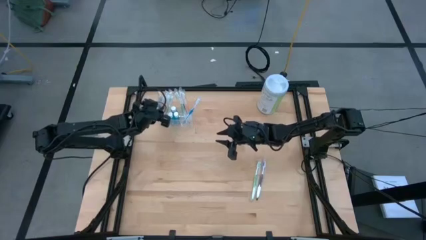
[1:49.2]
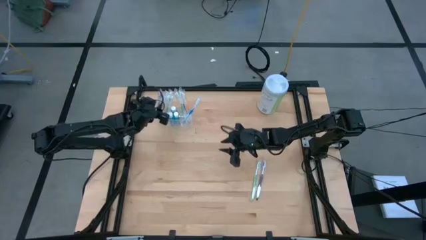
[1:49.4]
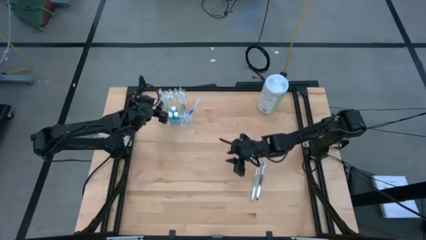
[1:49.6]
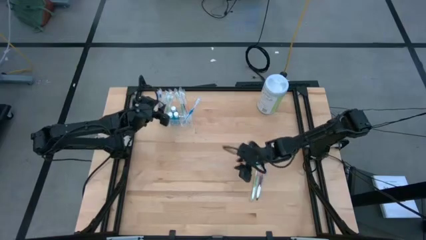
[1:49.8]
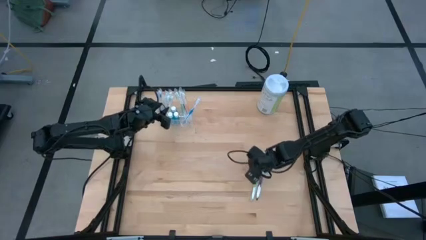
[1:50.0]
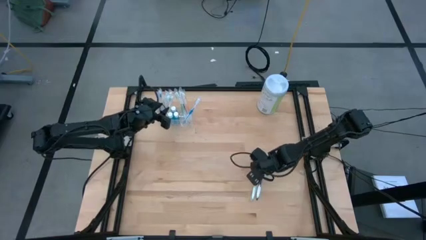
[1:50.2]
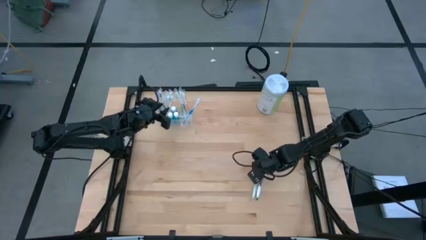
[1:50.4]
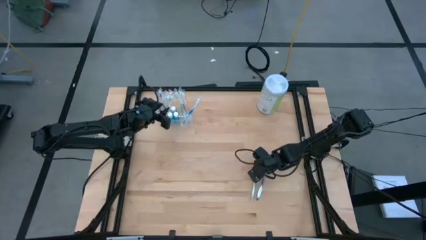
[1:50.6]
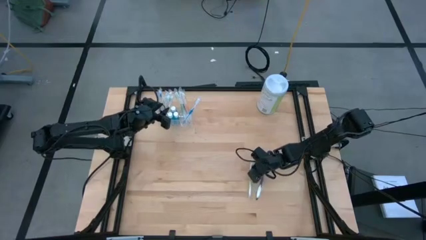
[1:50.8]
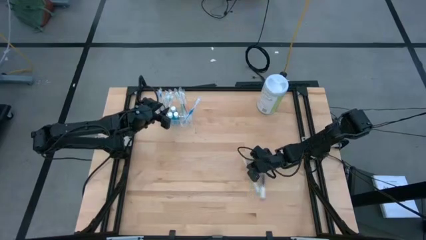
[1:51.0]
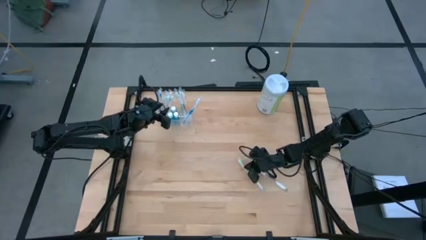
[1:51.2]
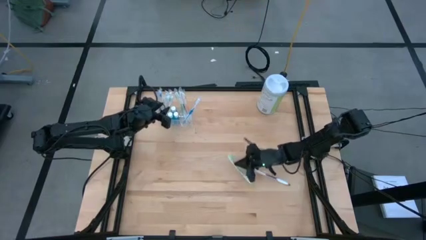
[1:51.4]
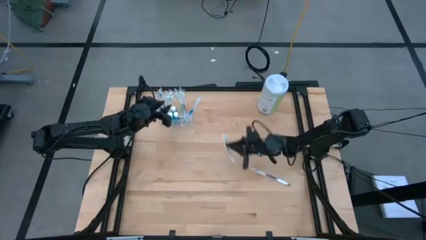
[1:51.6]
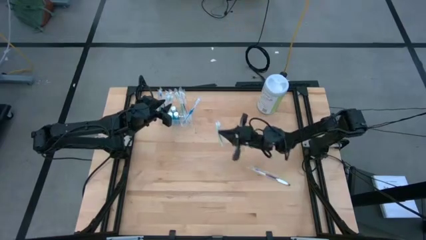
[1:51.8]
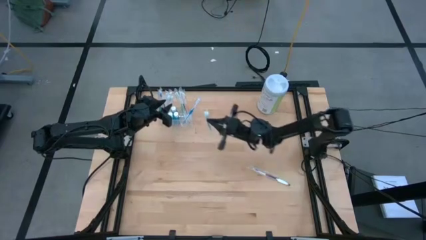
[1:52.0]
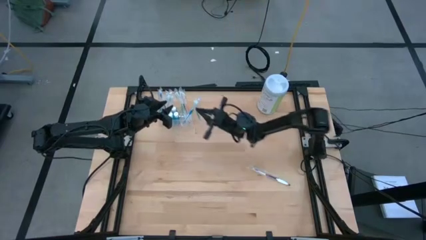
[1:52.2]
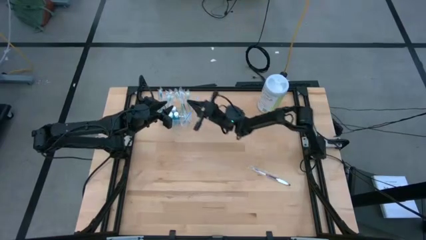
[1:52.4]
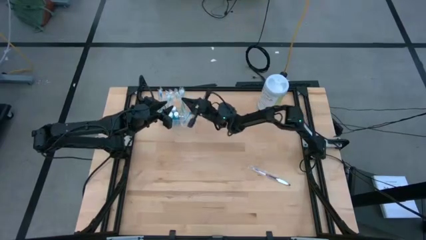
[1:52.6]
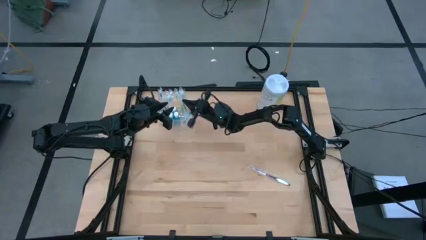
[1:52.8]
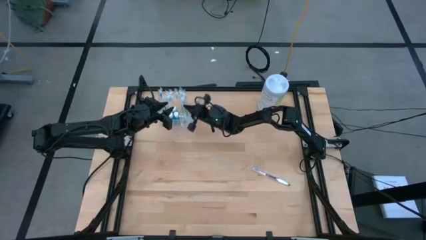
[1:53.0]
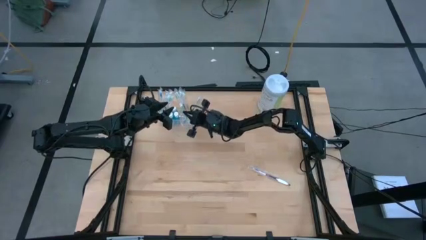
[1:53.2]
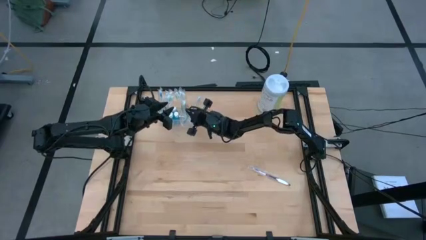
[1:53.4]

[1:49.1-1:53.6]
Task: Pick & Place toothbrushing station
Put the green toothbrush into the transparent organizer

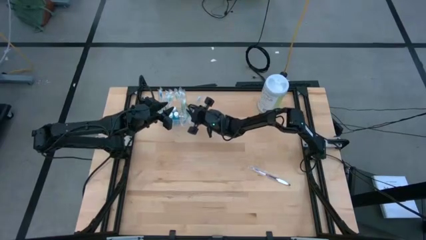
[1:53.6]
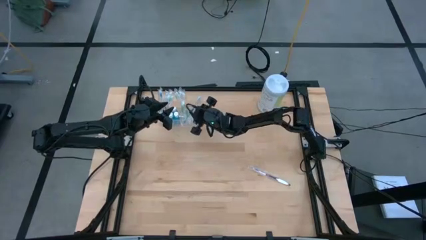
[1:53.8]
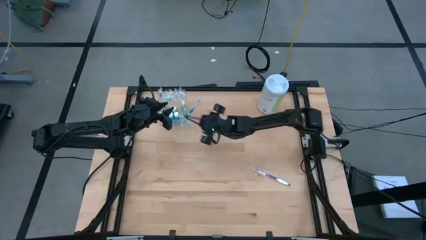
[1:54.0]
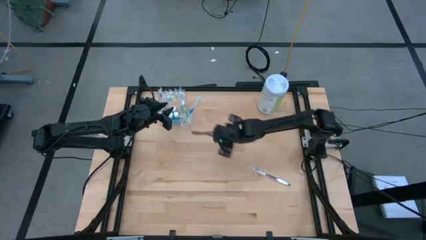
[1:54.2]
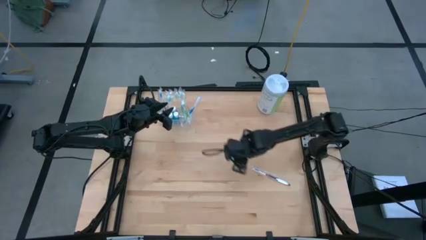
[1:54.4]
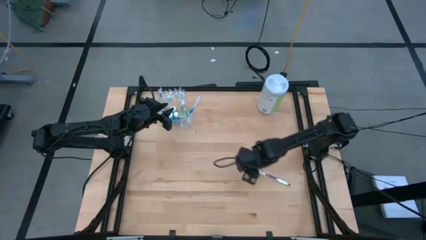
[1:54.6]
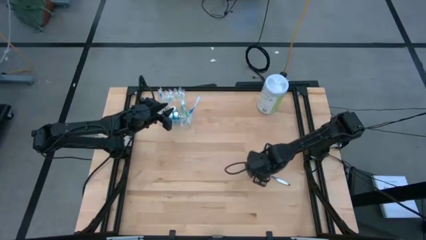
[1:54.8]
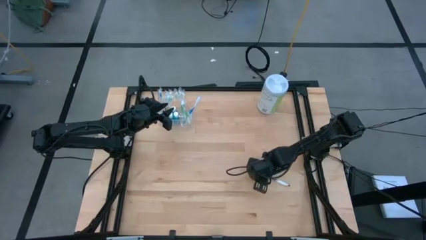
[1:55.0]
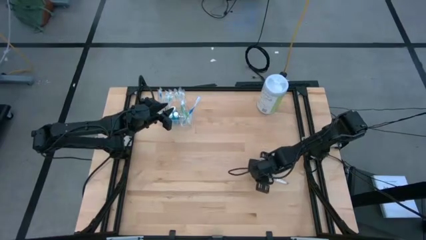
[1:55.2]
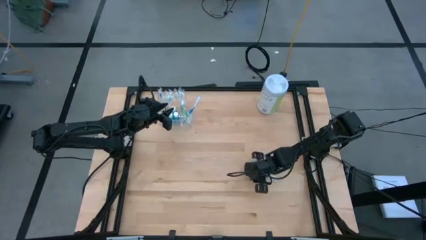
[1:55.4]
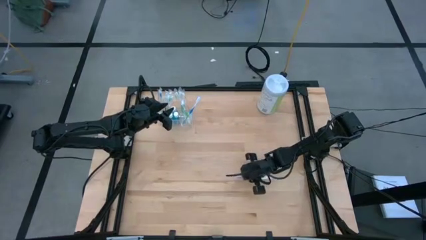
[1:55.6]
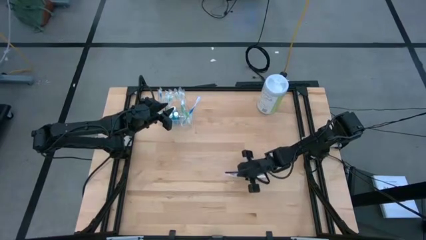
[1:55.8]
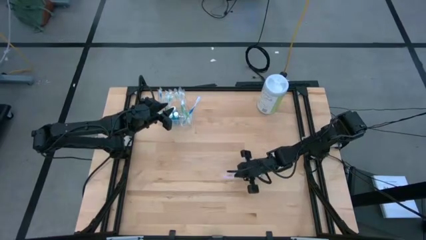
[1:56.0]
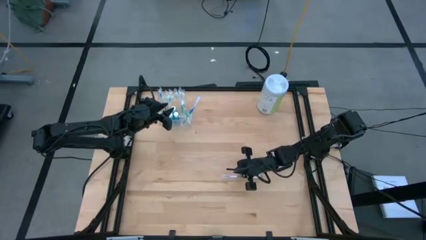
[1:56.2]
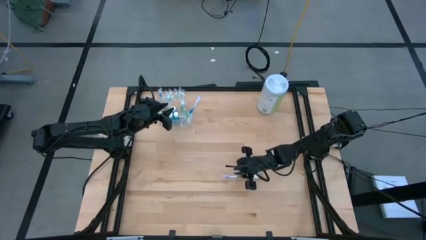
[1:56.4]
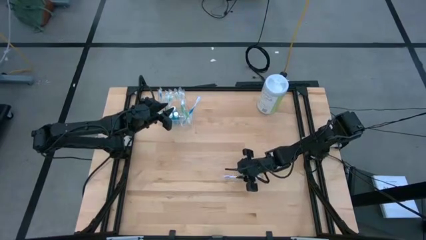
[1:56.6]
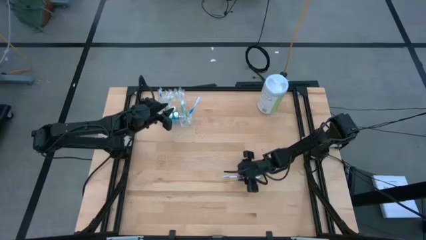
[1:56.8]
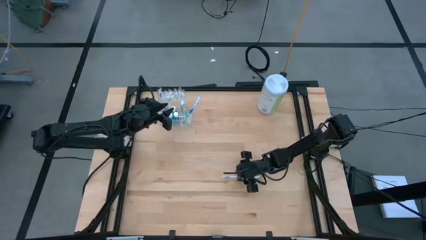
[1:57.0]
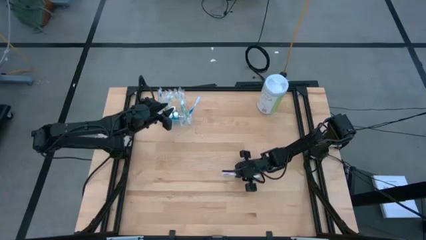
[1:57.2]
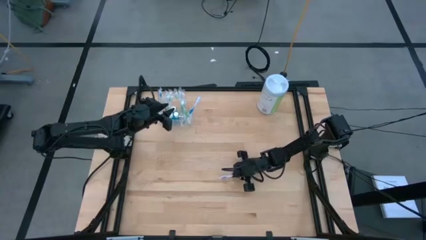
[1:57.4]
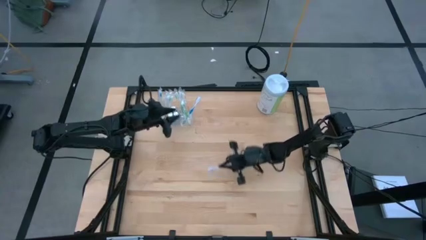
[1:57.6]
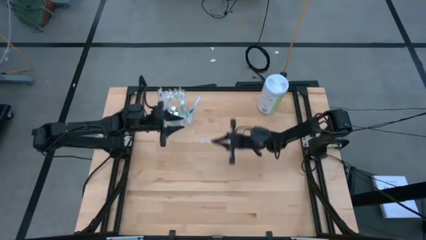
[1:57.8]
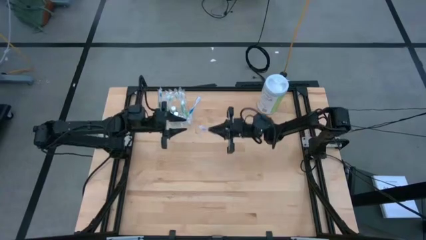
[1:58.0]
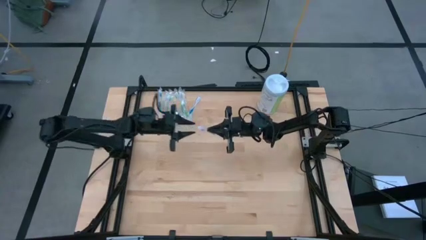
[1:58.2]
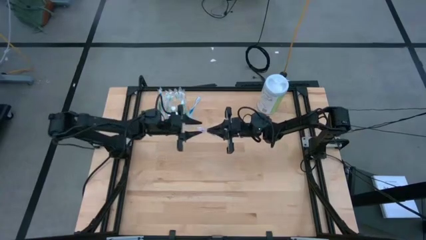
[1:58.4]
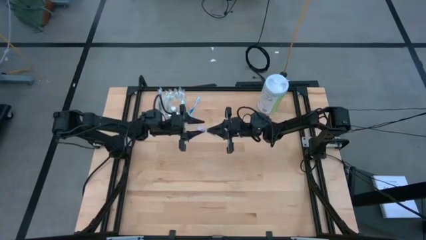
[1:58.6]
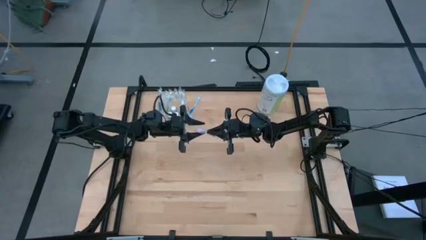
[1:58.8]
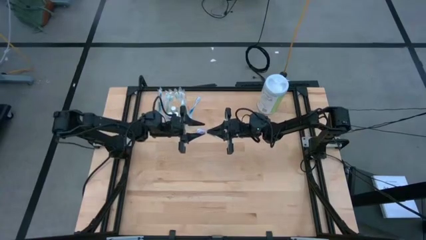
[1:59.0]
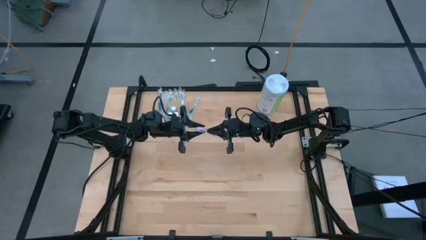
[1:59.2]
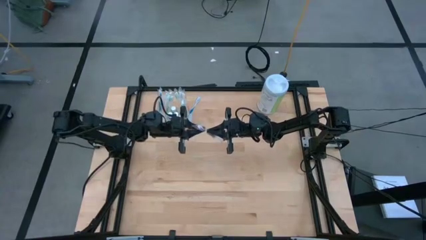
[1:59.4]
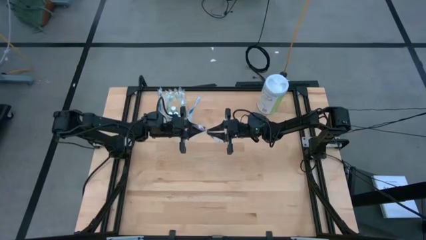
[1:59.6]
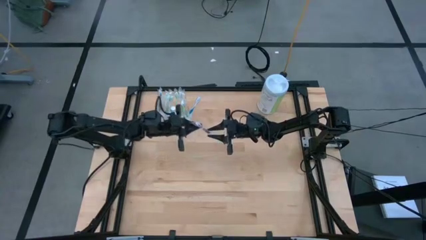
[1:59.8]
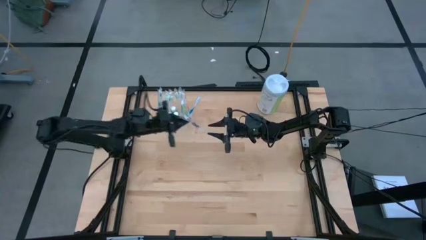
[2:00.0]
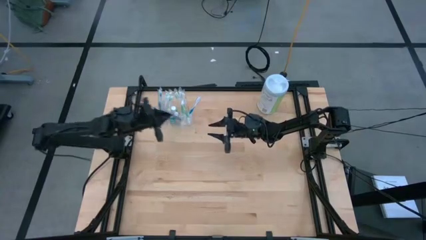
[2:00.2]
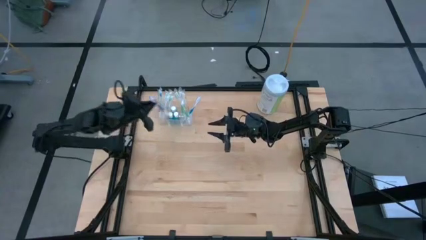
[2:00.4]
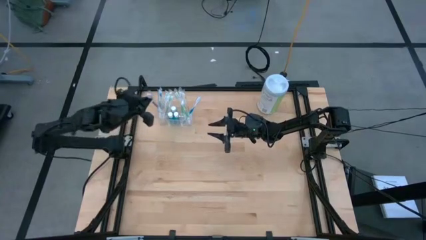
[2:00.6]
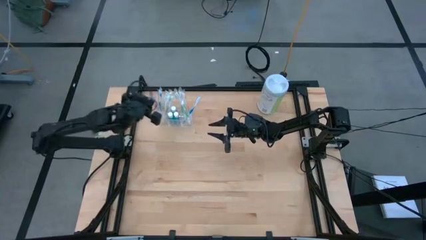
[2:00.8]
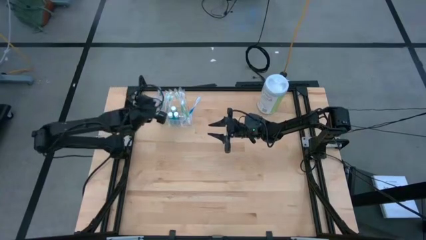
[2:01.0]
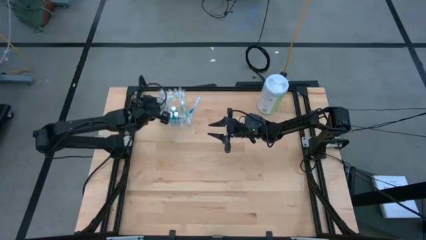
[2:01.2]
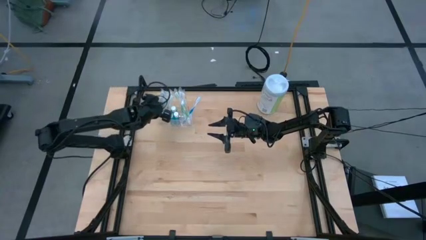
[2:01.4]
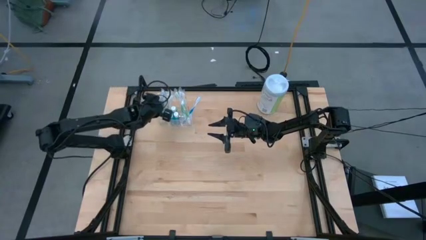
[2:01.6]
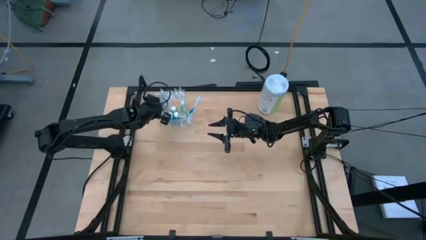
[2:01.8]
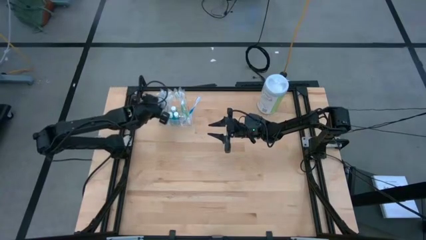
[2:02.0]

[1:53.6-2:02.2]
Put the purple toothbrush into the transparent organizer

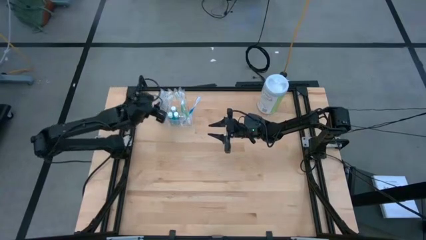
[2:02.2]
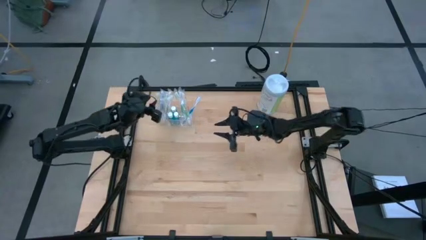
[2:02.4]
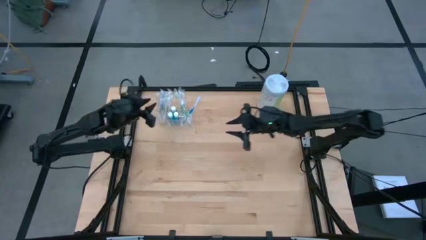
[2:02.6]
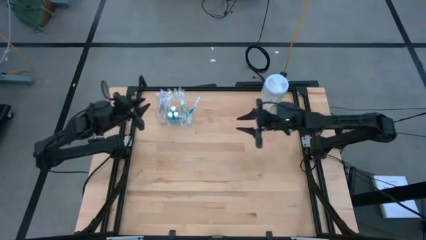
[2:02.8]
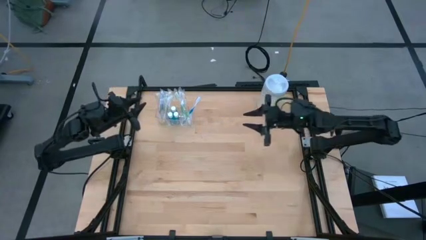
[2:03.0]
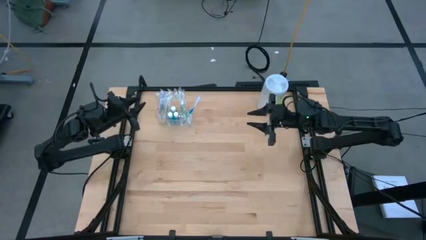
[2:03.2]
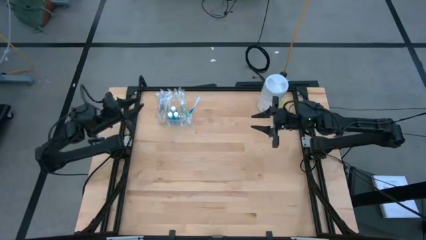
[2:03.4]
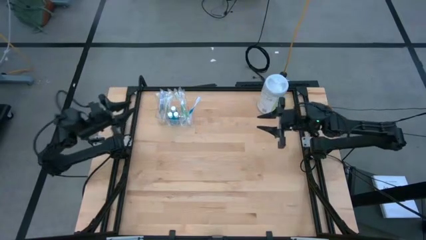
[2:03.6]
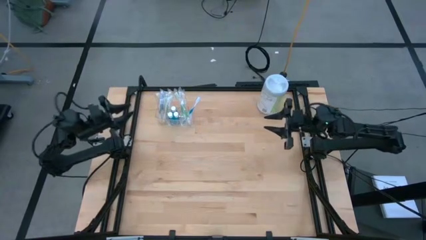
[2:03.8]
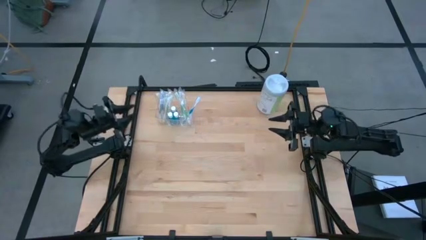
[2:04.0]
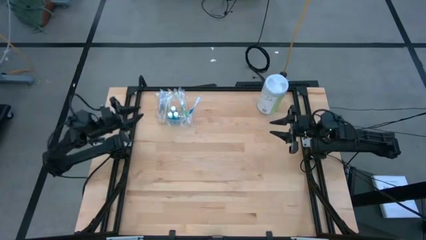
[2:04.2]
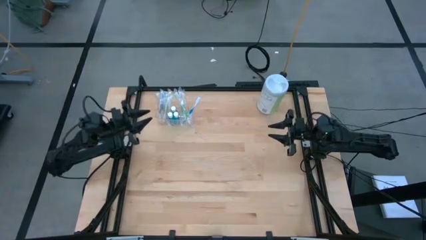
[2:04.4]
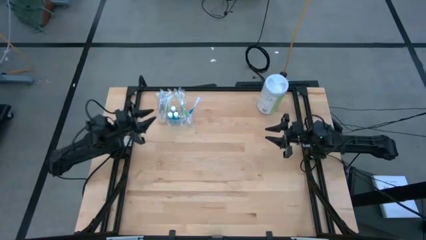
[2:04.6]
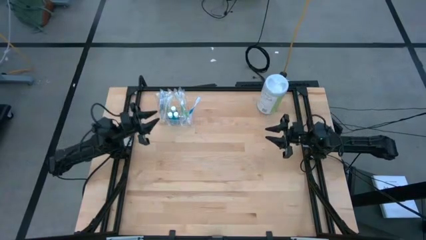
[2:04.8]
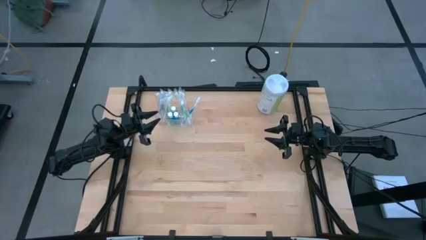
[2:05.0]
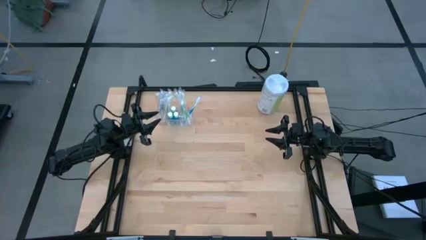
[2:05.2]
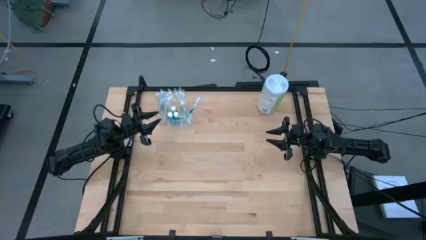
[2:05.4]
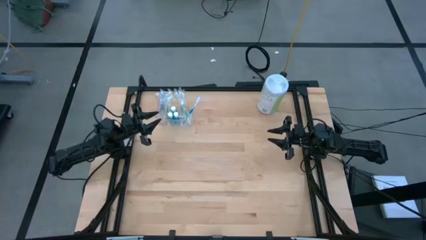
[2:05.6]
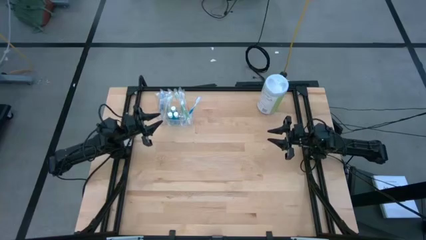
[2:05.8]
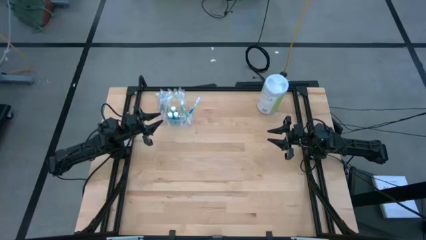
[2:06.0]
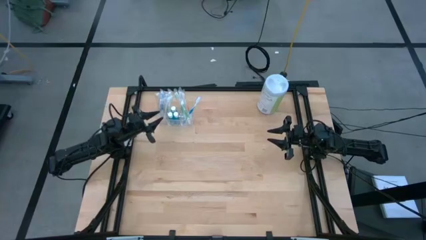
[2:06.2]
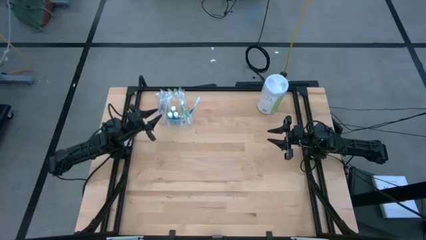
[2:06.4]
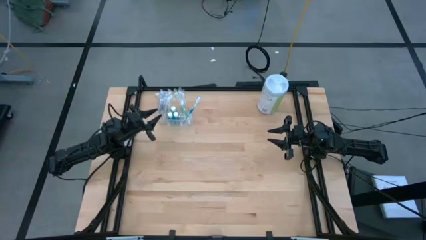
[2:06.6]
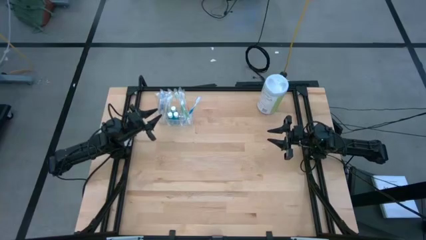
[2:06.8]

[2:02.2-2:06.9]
Return to Home Position
